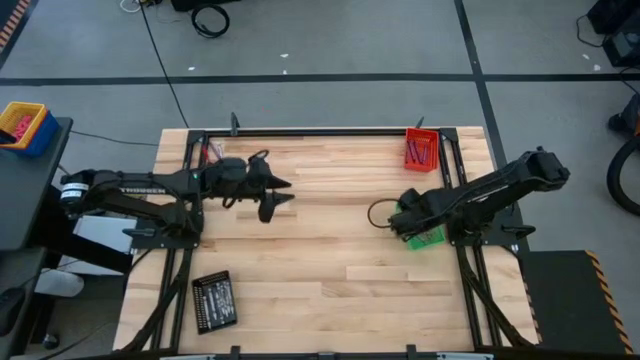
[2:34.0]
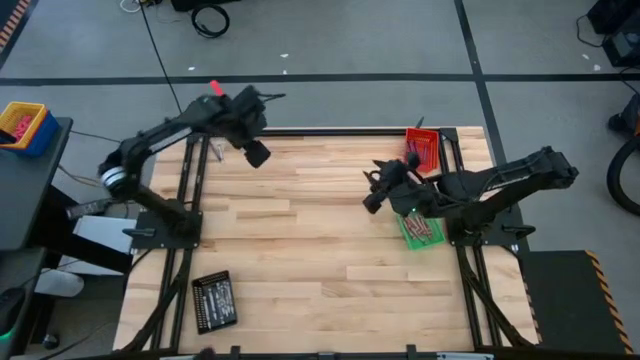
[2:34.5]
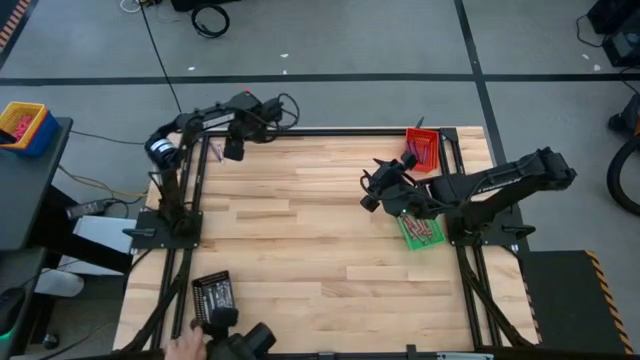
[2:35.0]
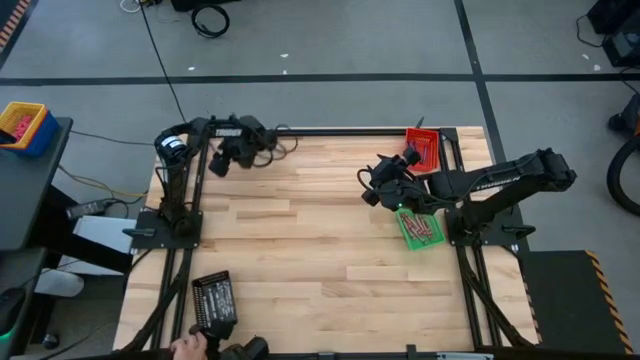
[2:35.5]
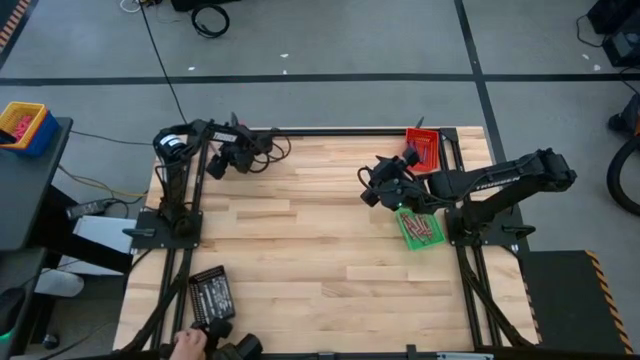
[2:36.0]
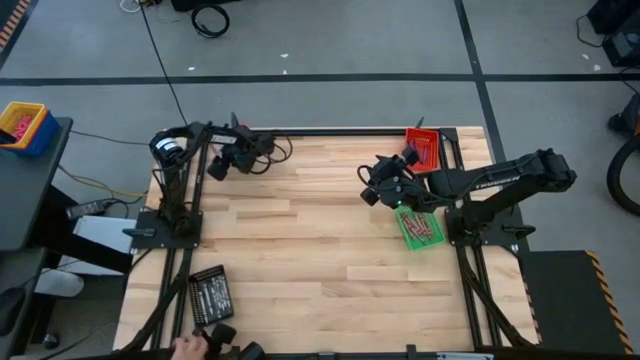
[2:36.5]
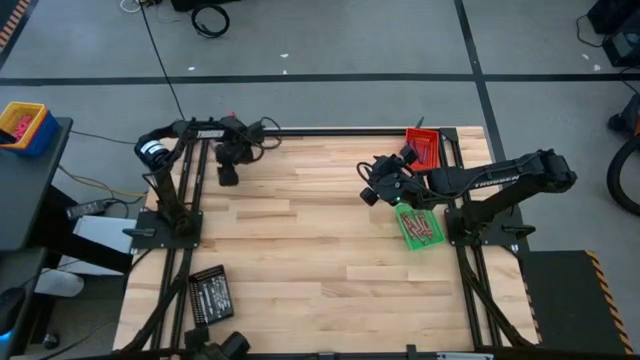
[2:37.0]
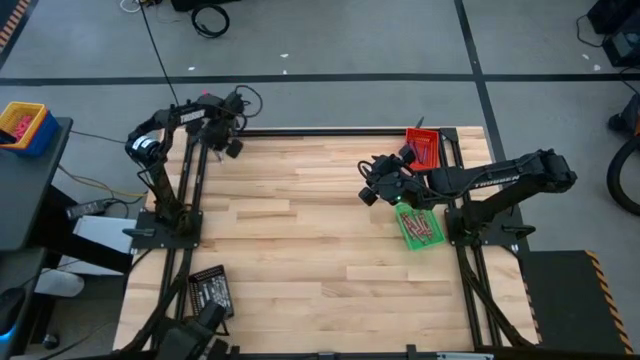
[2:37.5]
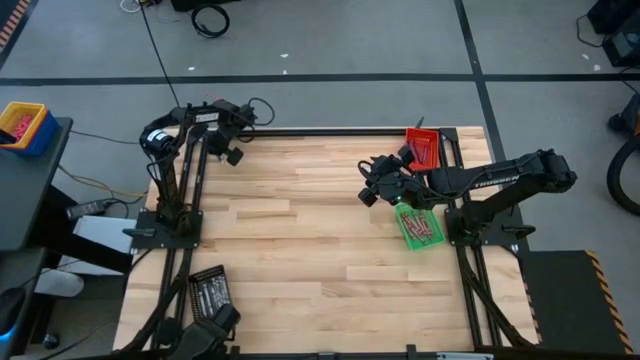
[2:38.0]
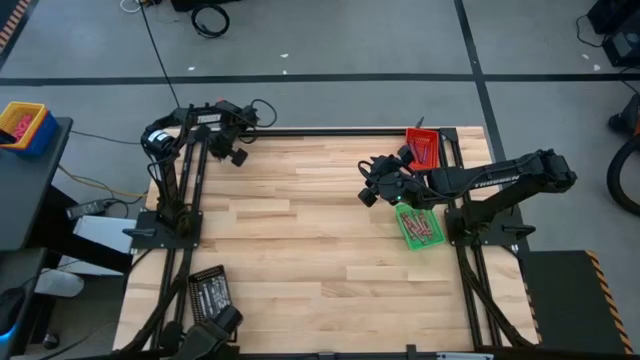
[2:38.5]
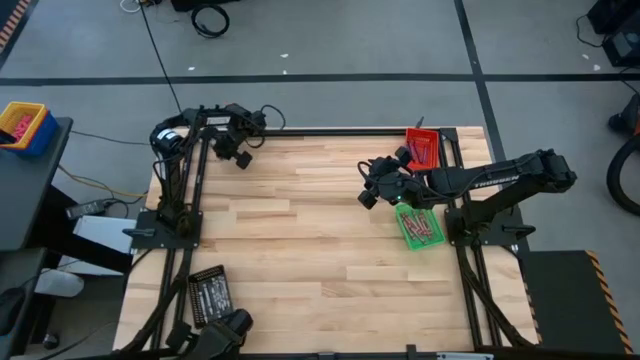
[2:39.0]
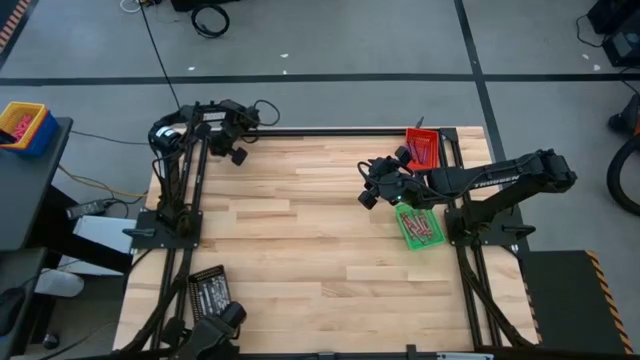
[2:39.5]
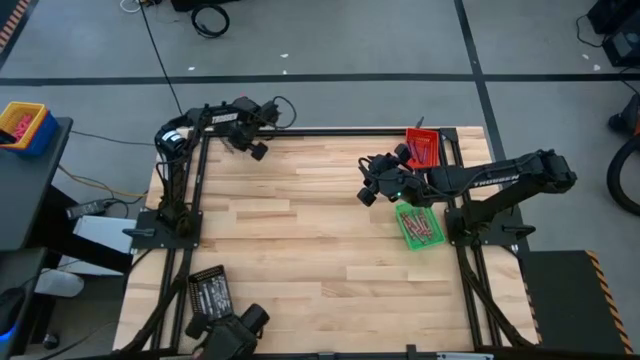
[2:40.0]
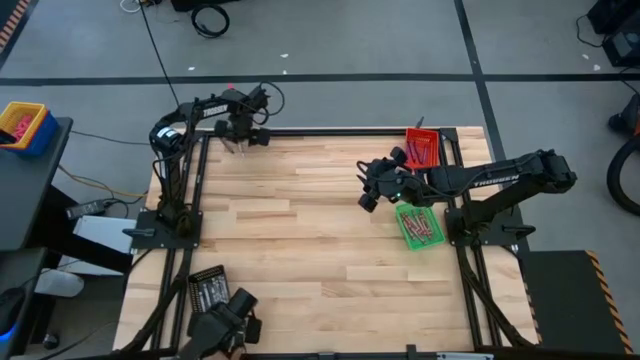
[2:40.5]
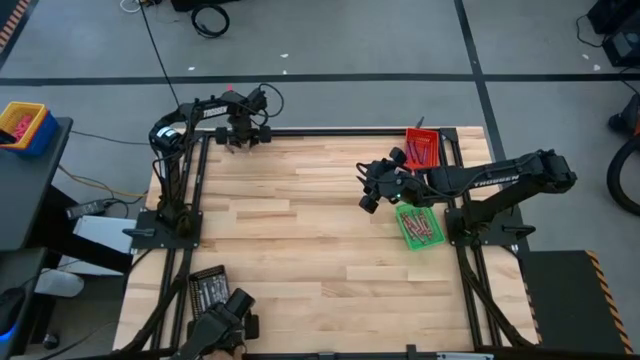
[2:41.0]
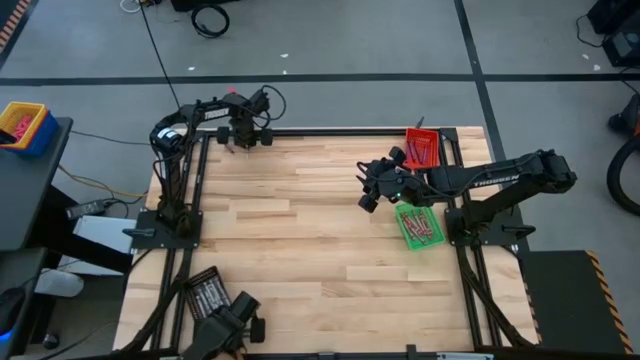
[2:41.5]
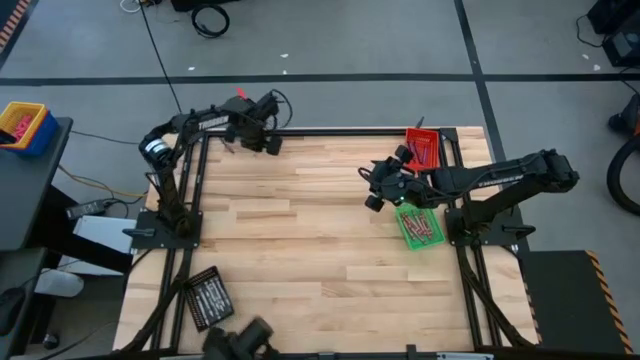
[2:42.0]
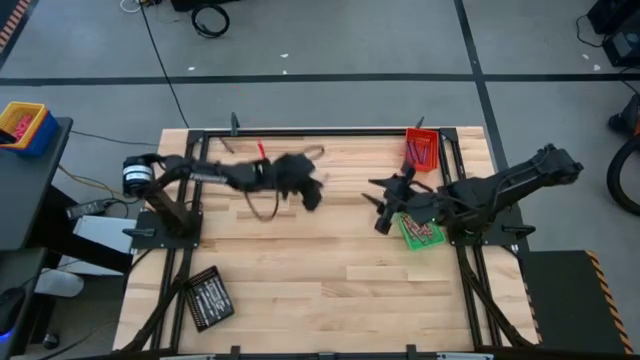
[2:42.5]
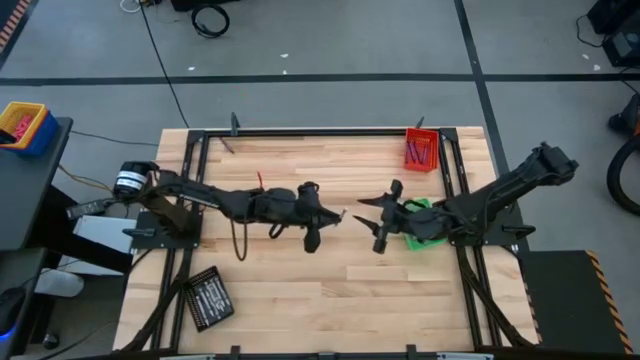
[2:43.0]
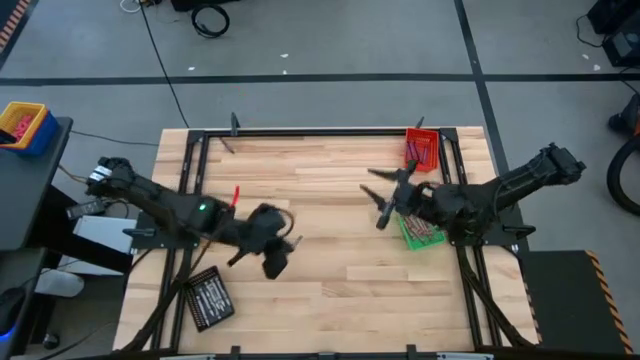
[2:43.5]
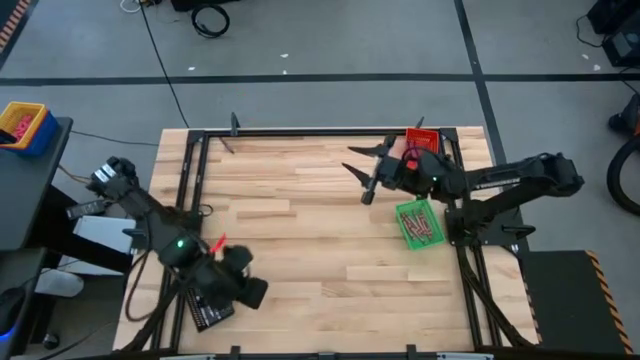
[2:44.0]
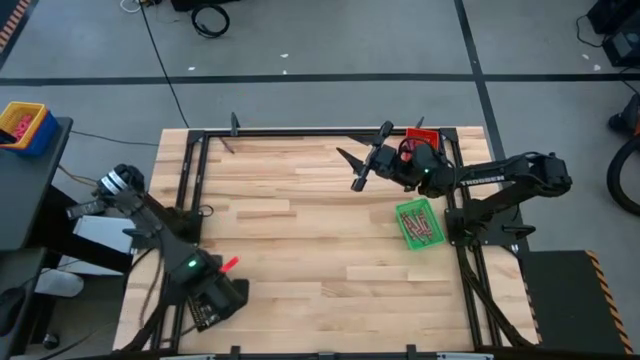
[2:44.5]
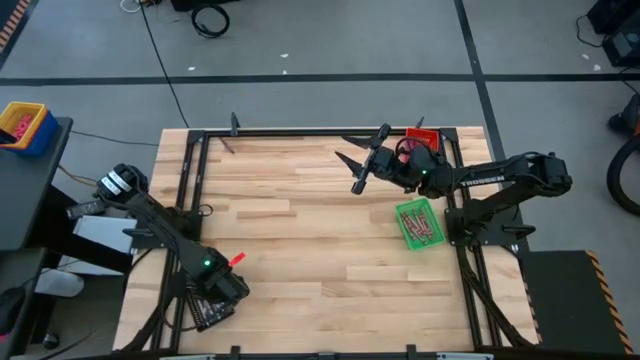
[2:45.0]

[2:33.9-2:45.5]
Task: Sort crayons
Put the white crayon into the black bin

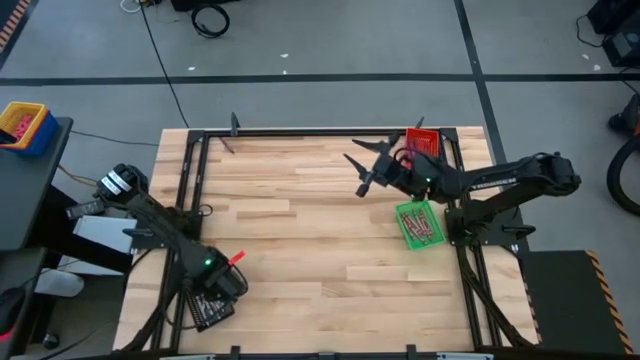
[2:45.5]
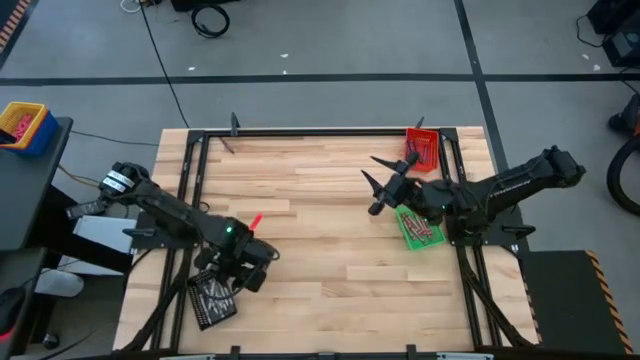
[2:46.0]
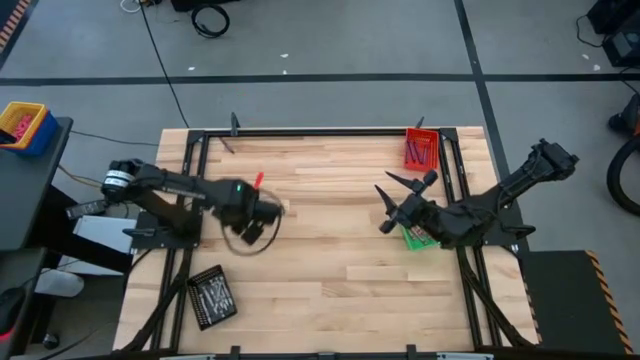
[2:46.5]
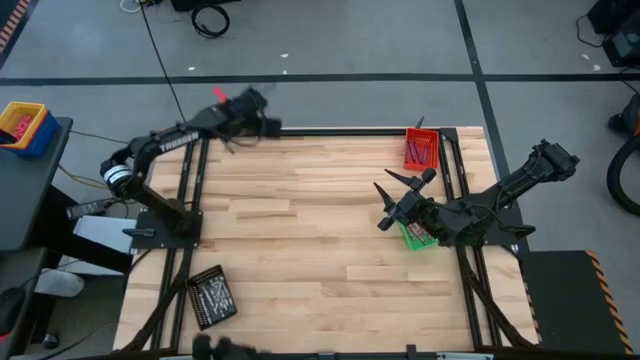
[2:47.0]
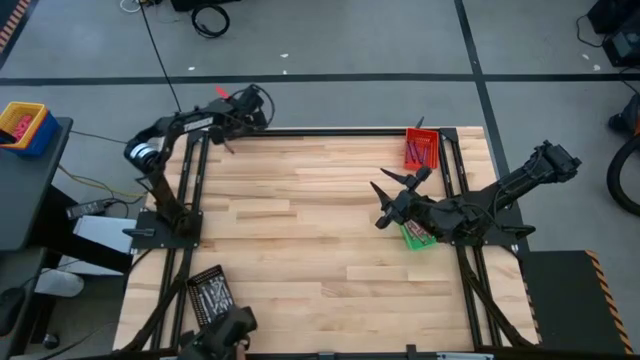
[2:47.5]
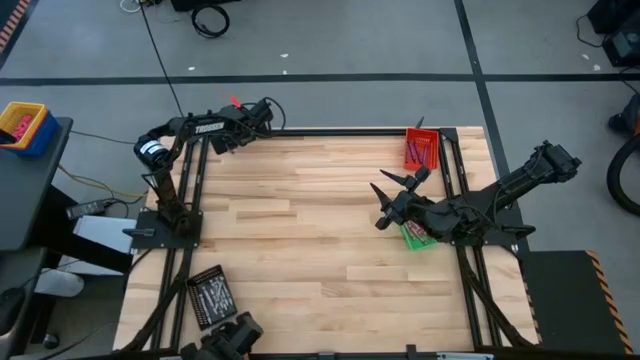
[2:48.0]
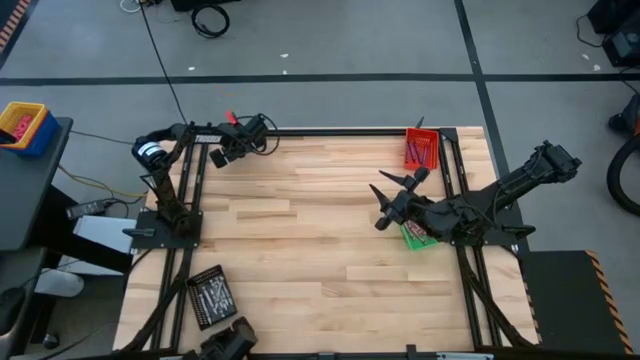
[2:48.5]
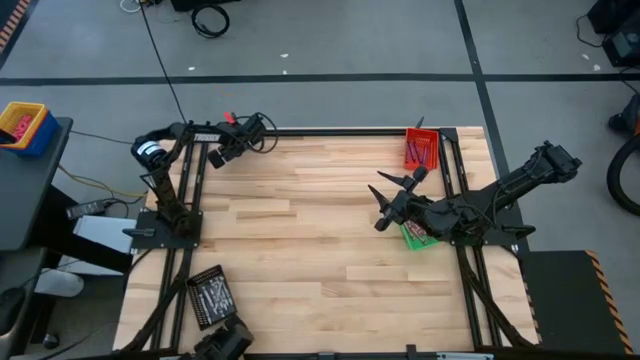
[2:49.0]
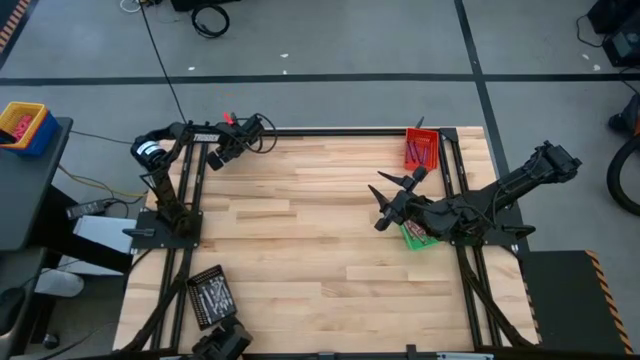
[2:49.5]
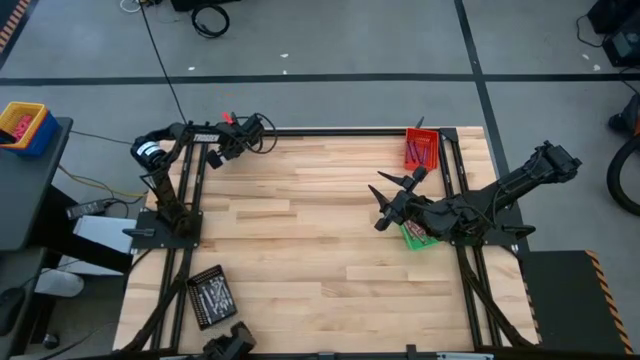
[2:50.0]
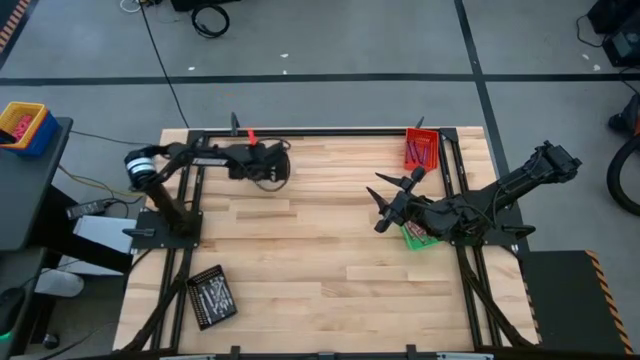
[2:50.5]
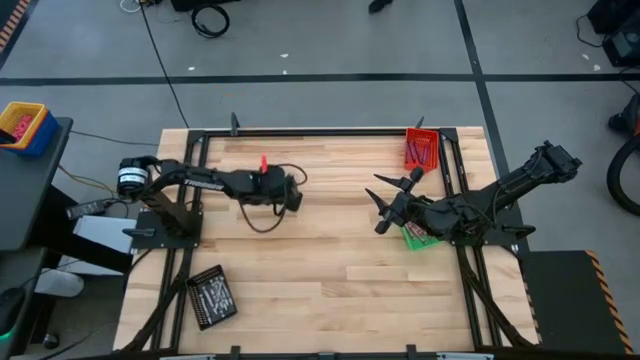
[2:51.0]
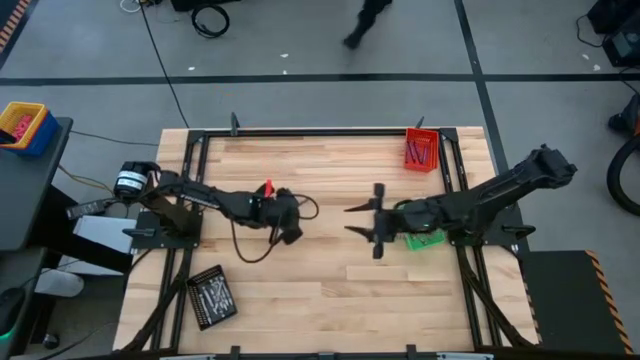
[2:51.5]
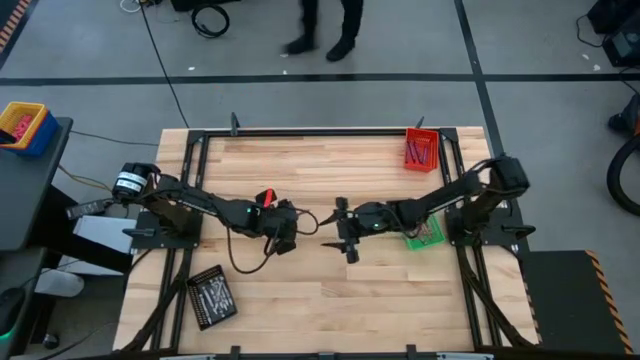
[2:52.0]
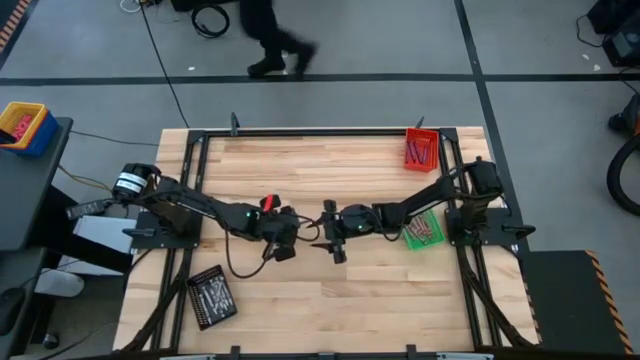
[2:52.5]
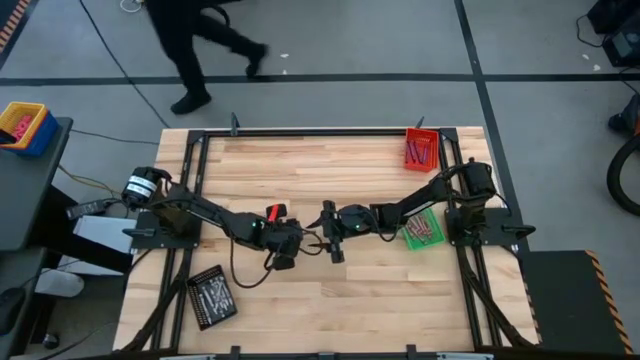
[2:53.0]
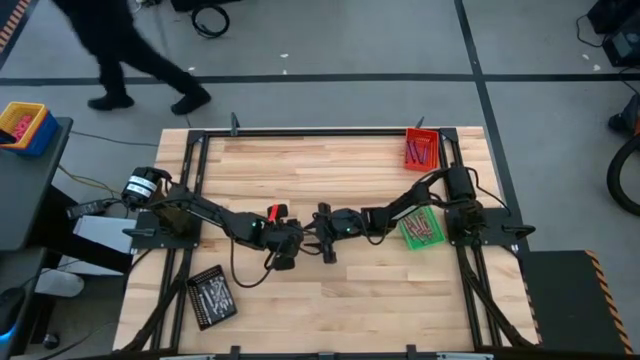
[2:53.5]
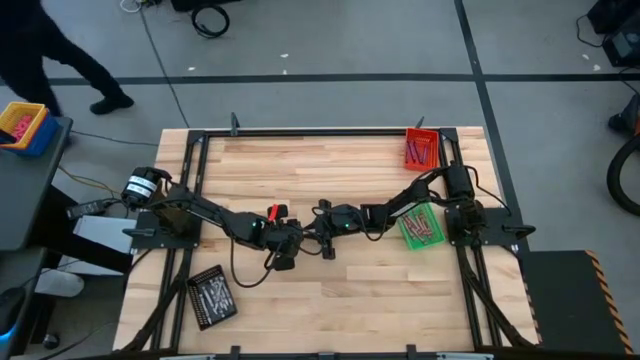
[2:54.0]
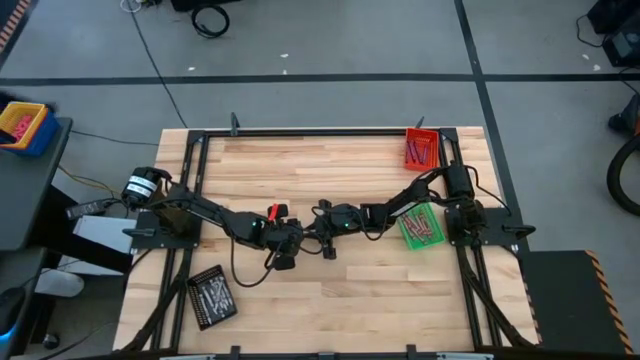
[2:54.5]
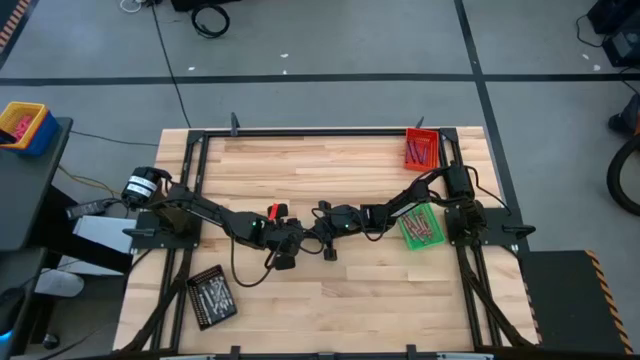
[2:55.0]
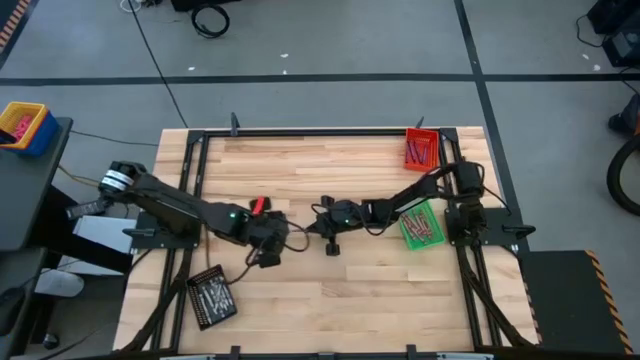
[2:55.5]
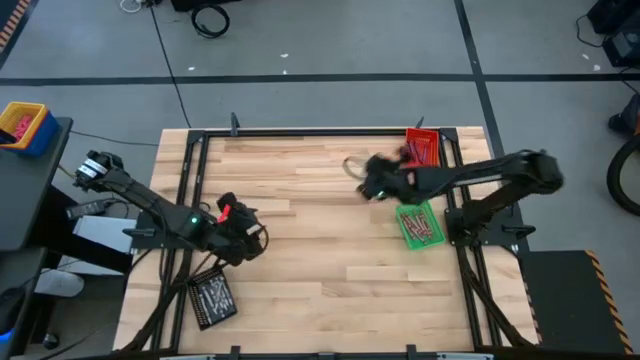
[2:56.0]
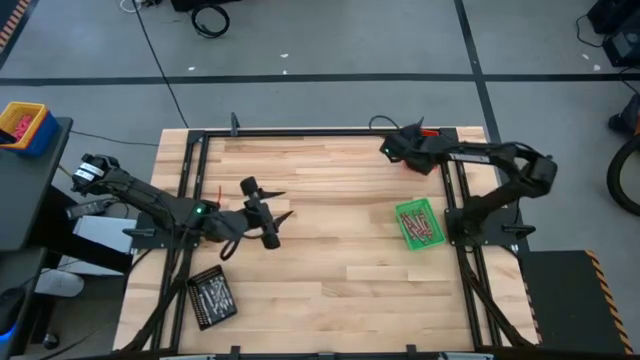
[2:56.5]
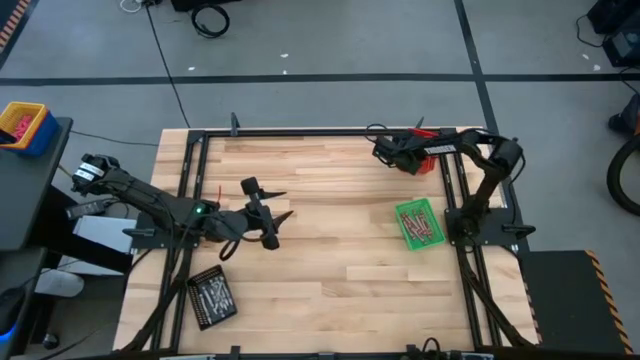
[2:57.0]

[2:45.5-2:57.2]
Put the purple crayon into the red bin
